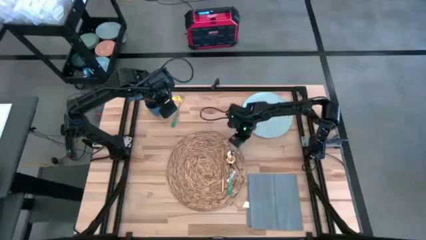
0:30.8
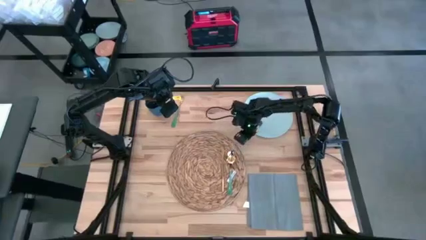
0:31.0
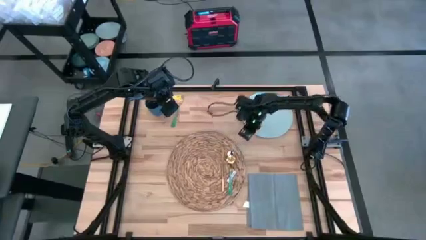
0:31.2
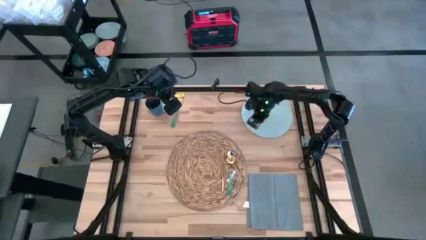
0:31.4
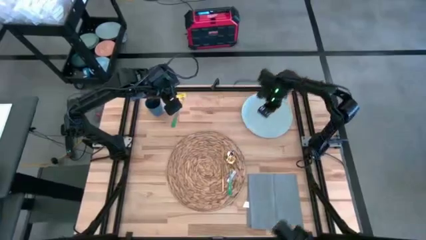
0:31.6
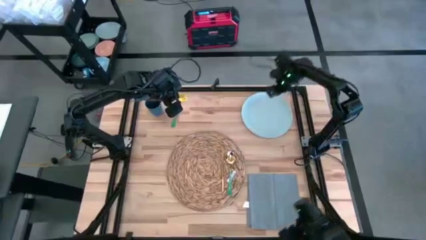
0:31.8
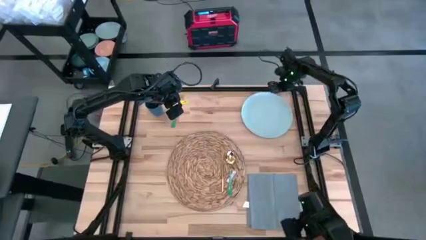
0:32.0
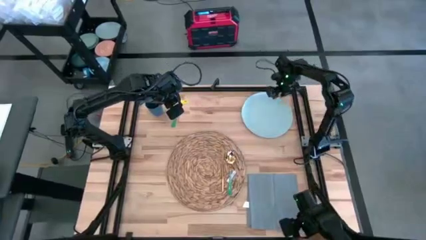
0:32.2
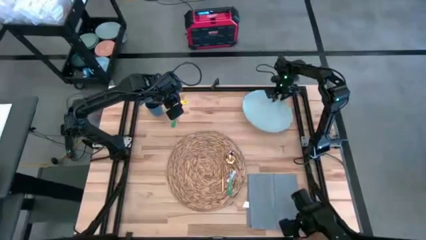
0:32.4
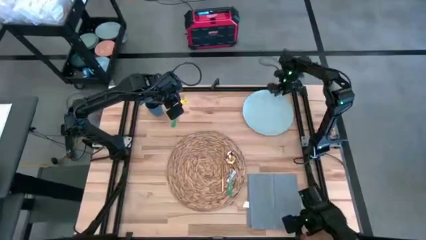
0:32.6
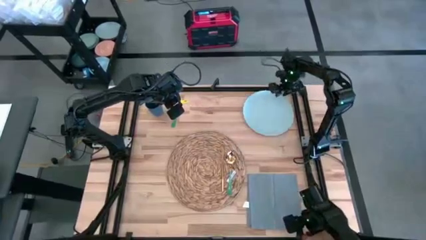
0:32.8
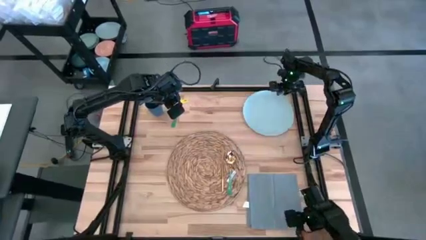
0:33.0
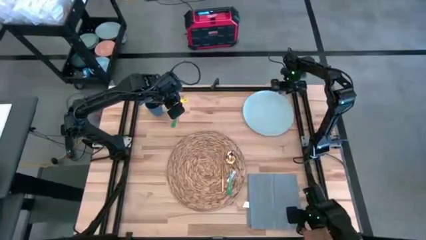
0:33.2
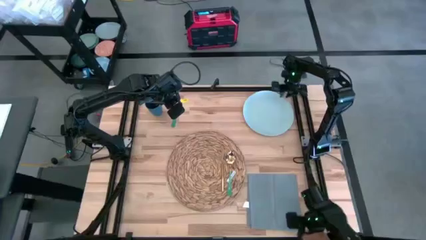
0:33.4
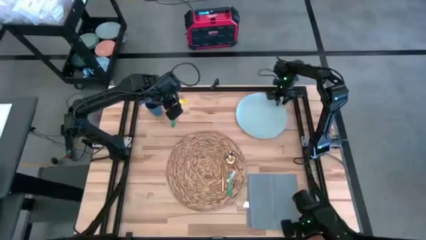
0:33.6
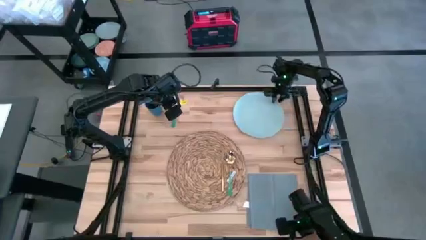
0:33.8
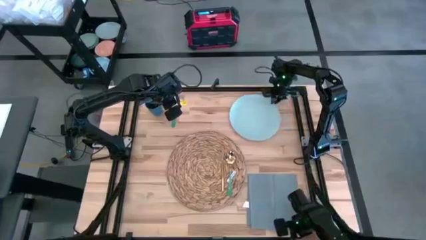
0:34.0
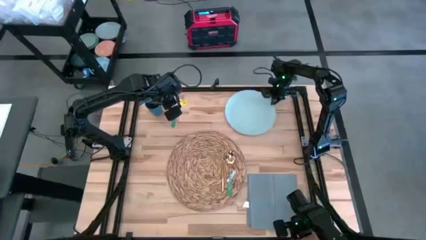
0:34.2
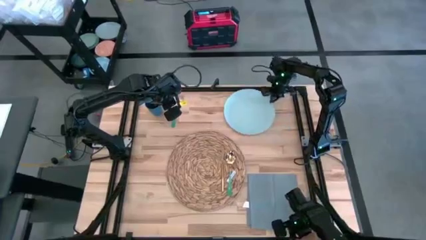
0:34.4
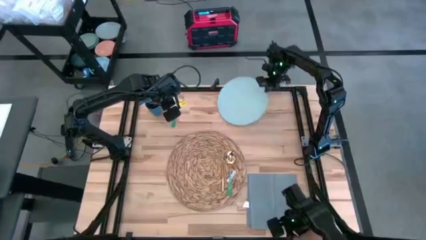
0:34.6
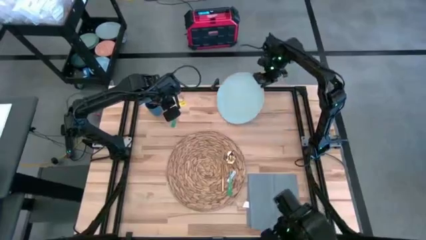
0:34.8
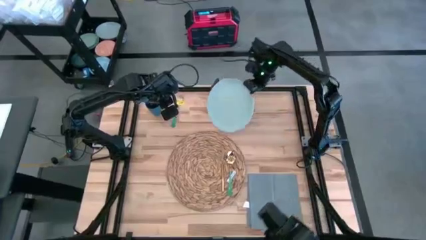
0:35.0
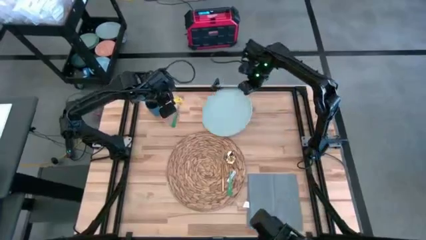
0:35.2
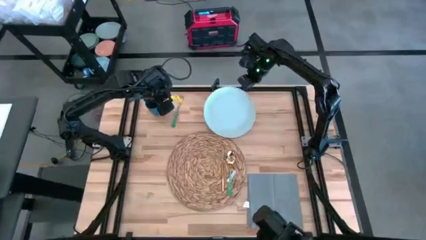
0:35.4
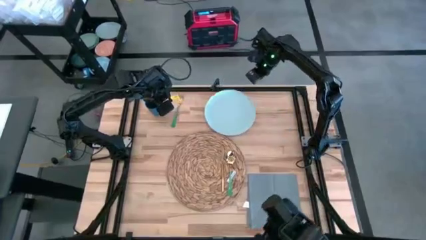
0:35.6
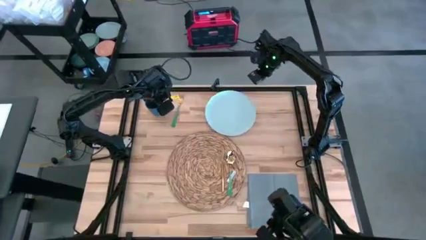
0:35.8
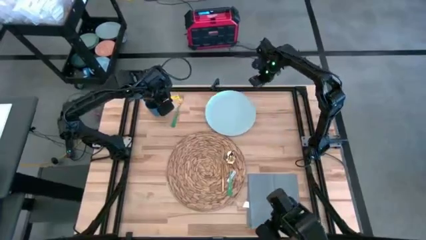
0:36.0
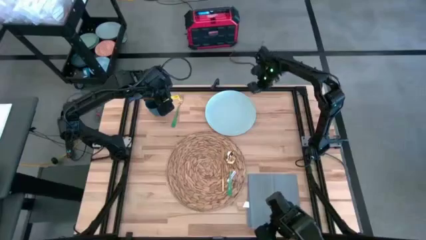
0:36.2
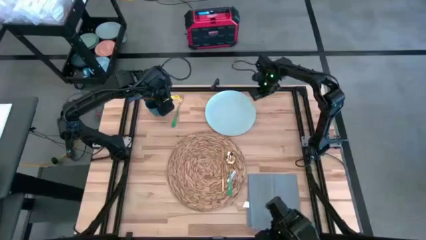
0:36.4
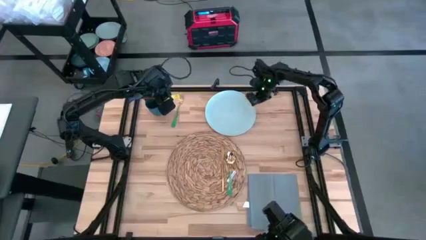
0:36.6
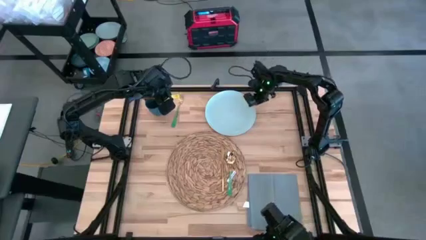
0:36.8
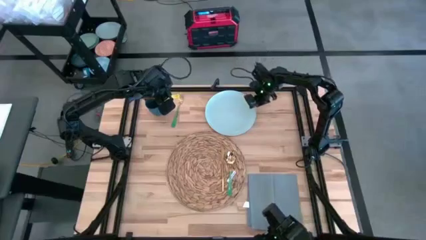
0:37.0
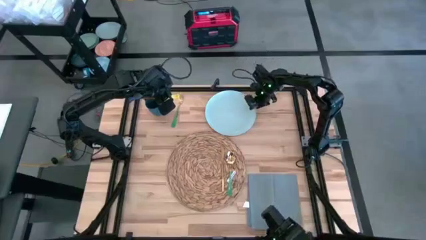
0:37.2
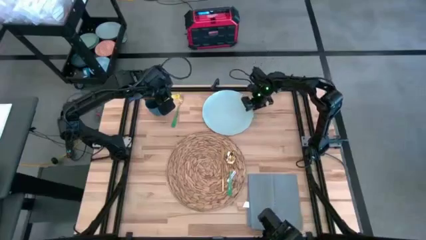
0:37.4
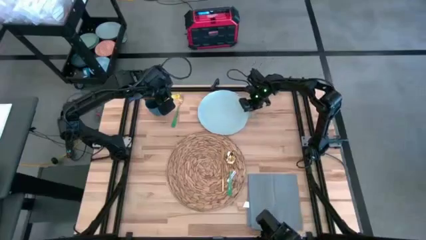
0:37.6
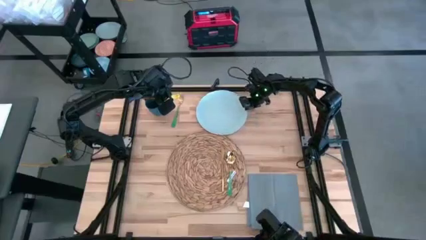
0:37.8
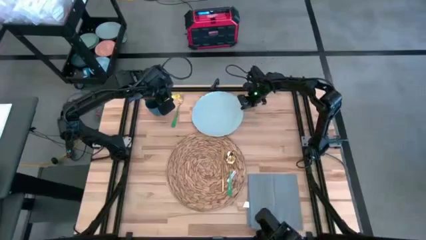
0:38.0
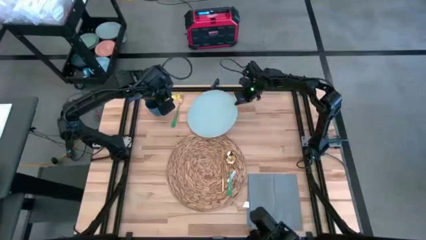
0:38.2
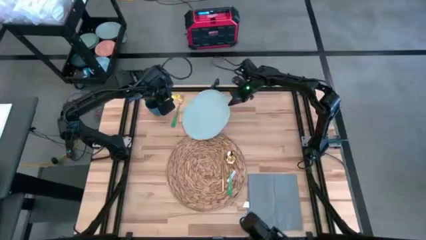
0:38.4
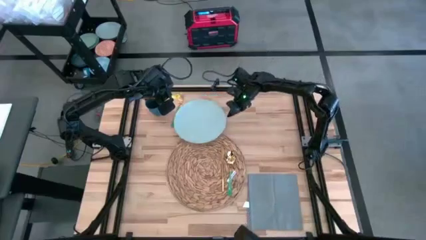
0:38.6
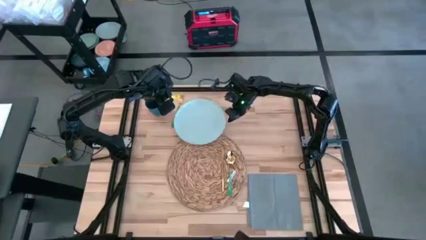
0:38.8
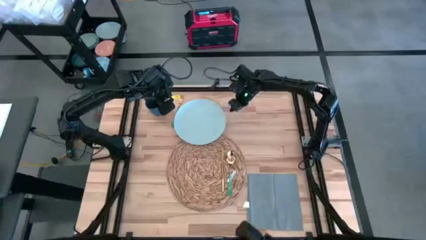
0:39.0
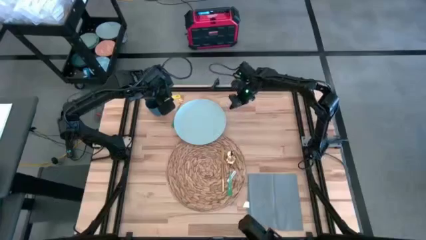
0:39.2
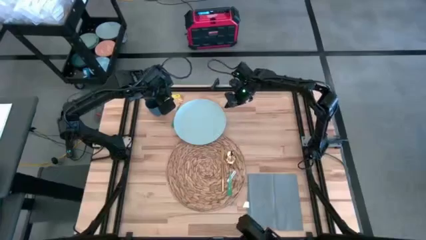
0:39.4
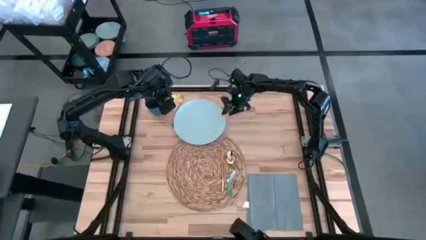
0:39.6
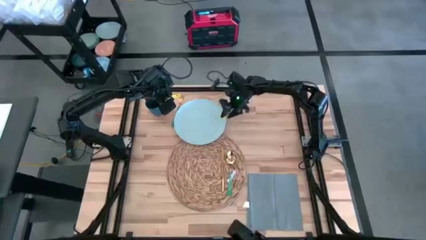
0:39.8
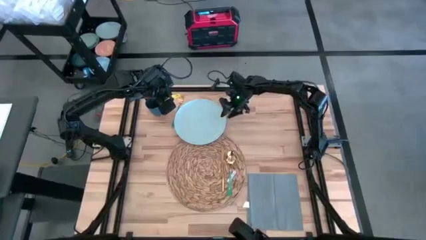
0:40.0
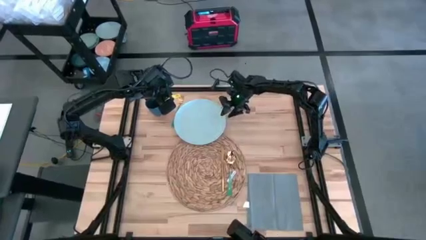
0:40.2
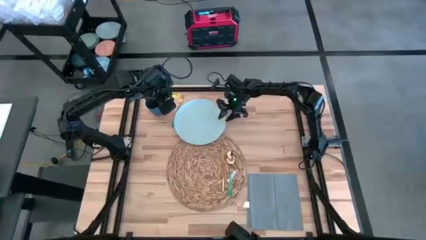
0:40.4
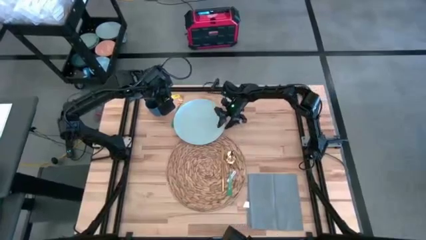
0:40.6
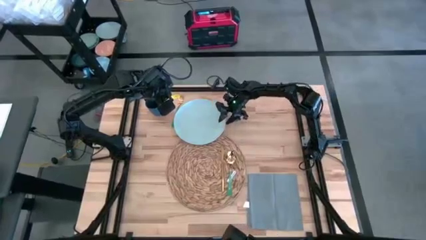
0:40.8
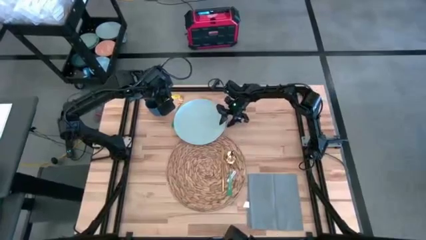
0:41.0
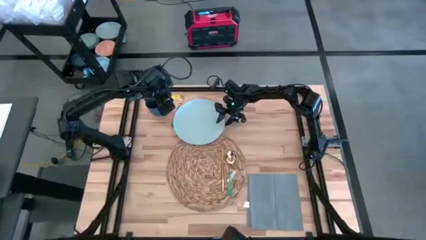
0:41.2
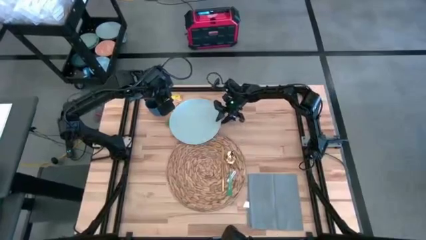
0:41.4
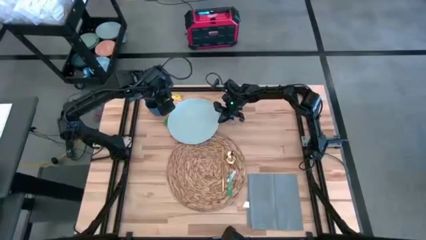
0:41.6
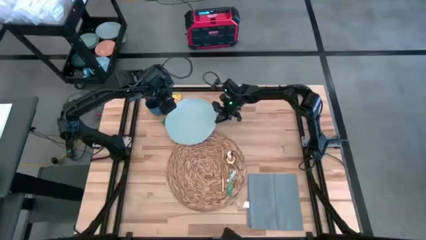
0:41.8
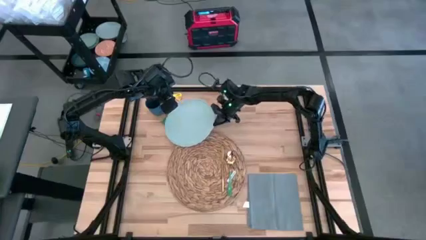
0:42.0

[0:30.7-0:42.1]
Task: Set table place
Put the light blue plate on the brown placemat to the left of the gold table knife

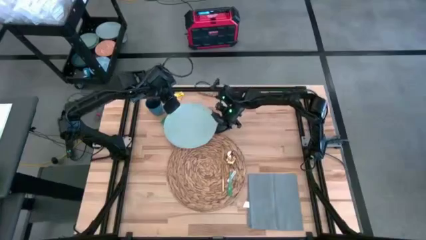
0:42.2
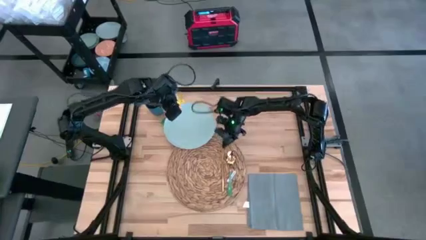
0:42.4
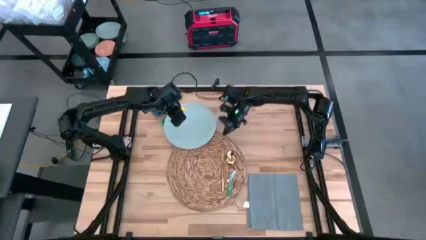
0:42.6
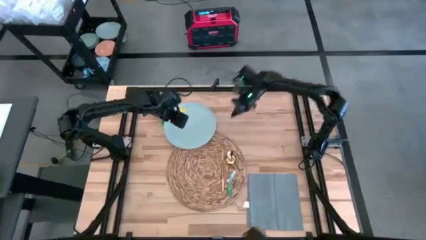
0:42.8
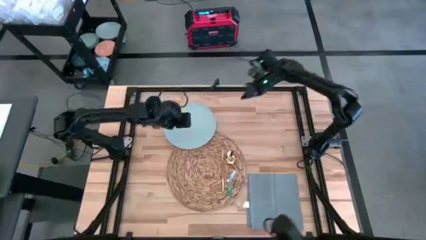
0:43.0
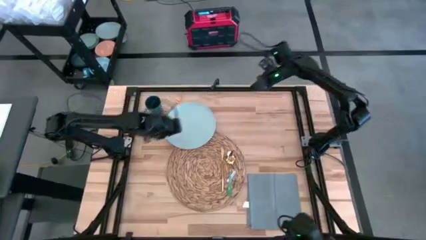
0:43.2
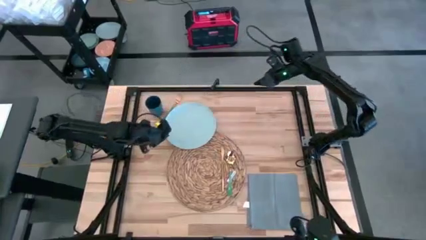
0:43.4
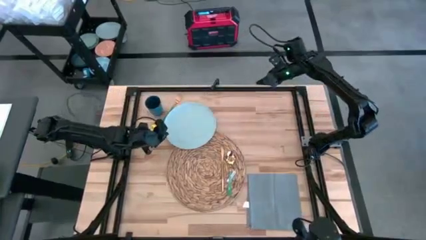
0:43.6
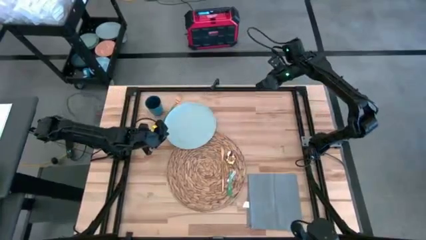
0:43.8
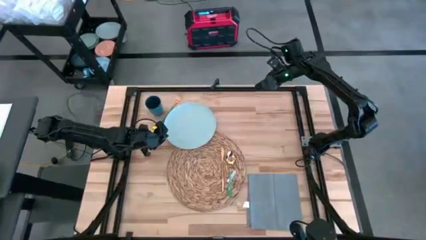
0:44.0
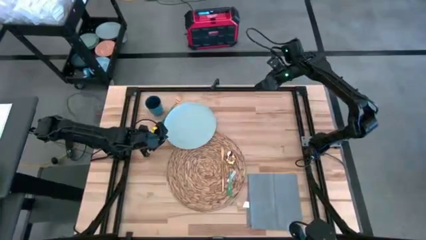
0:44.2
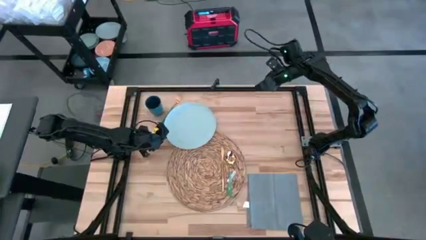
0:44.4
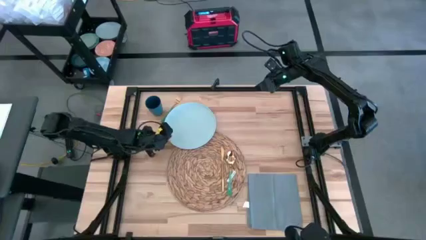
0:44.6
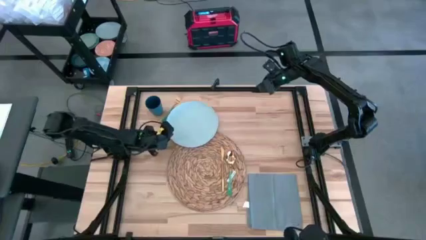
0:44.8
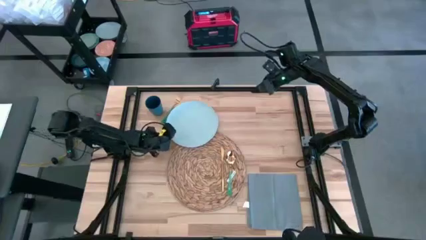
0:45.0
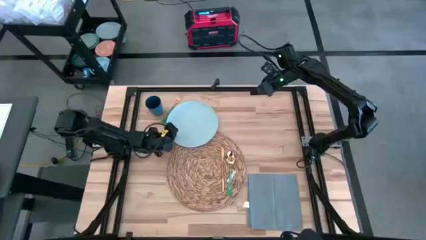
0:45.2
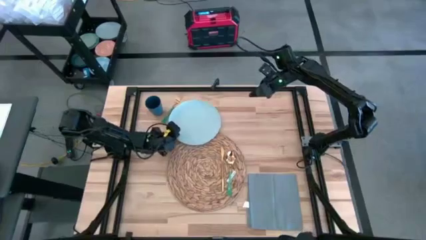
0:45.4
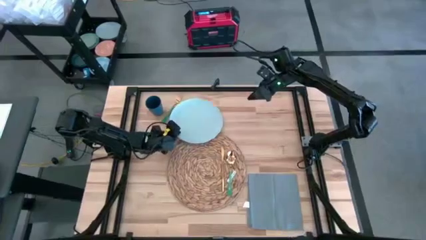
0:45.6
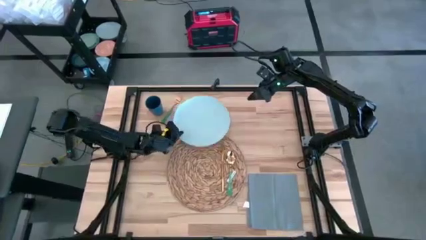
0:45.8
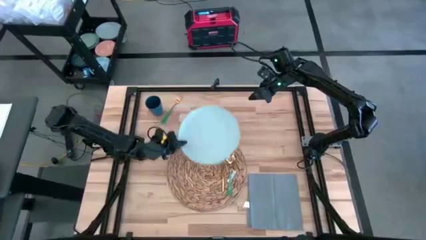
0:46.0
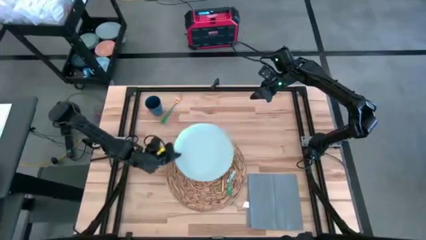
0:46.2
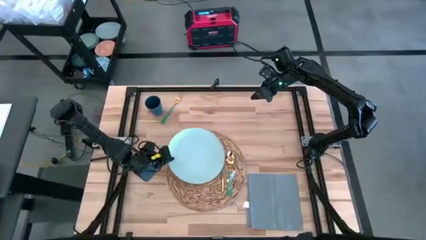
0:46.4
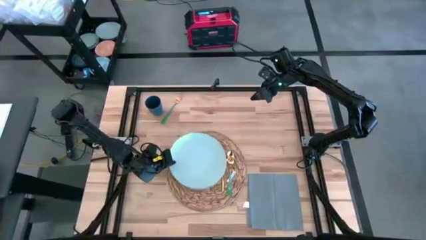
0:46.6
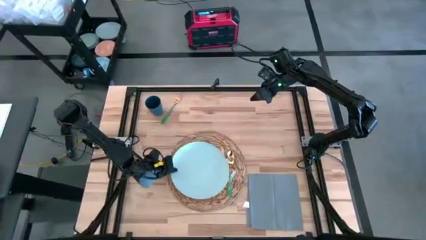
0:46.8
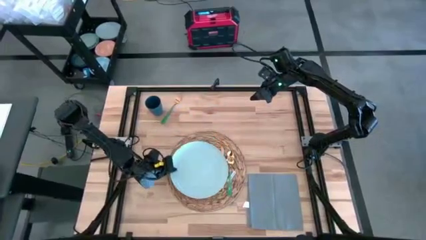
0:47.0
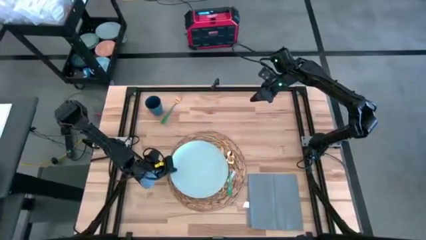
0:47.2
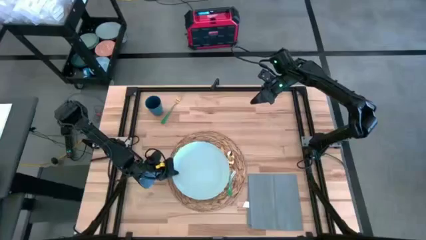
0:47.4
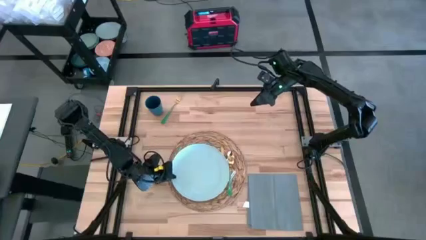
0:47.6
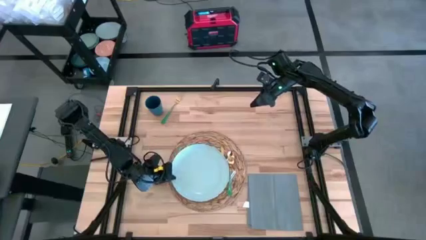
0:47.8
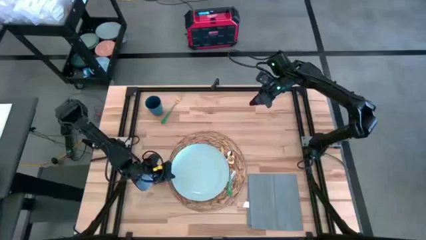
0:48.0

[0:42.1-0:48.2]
Put the light blue plate on the brown placemat to the left of the gold table knife
